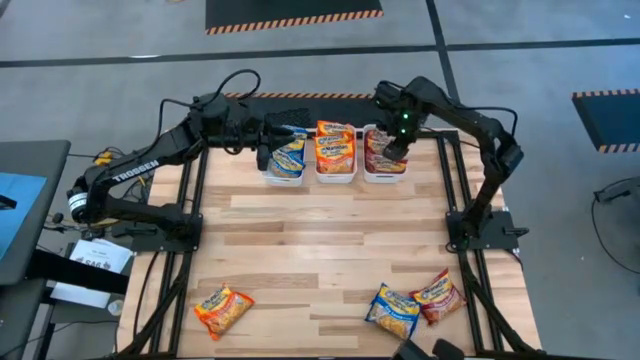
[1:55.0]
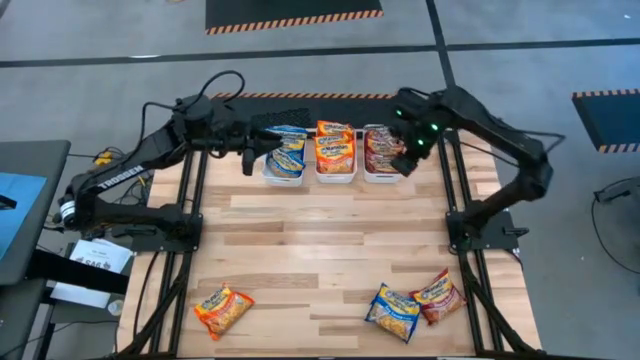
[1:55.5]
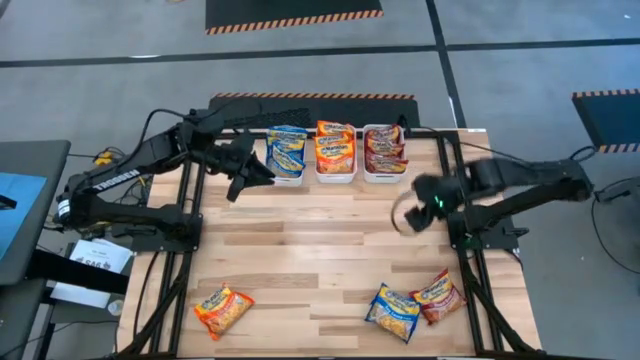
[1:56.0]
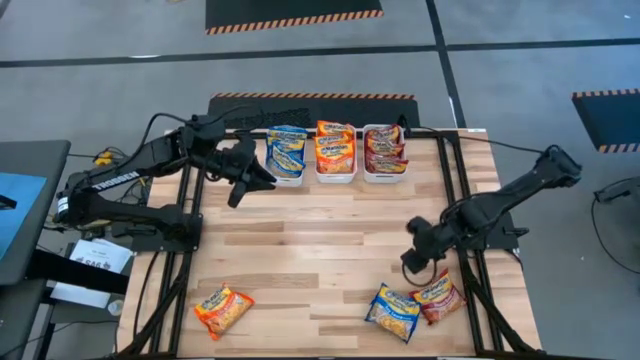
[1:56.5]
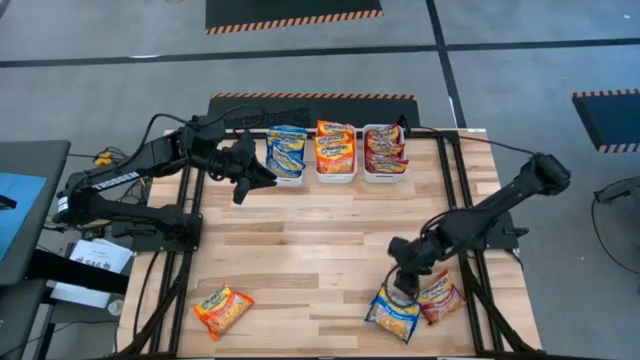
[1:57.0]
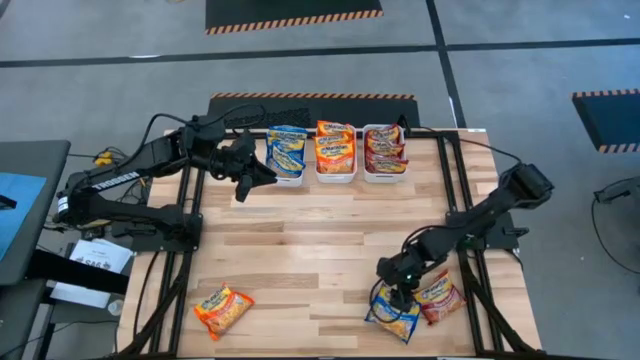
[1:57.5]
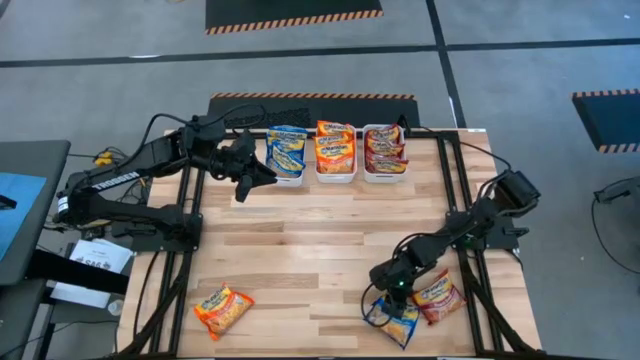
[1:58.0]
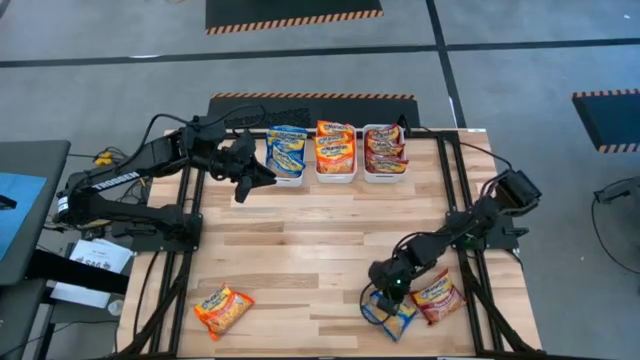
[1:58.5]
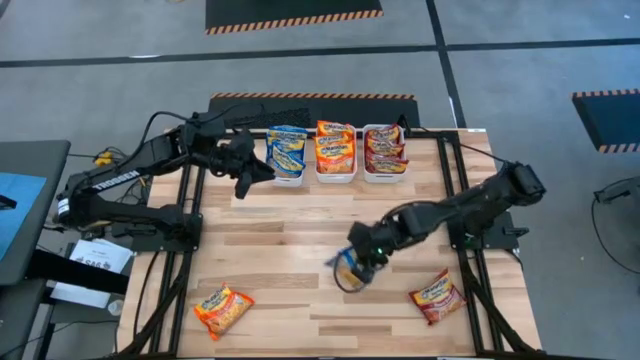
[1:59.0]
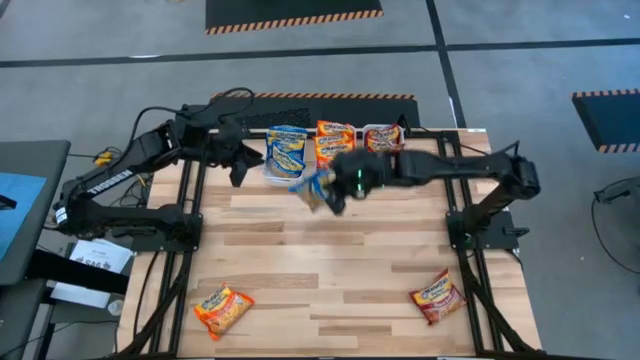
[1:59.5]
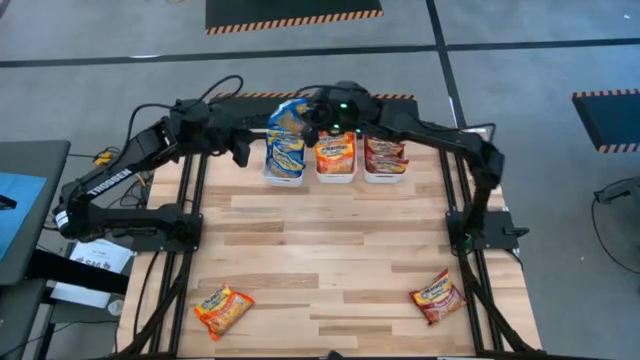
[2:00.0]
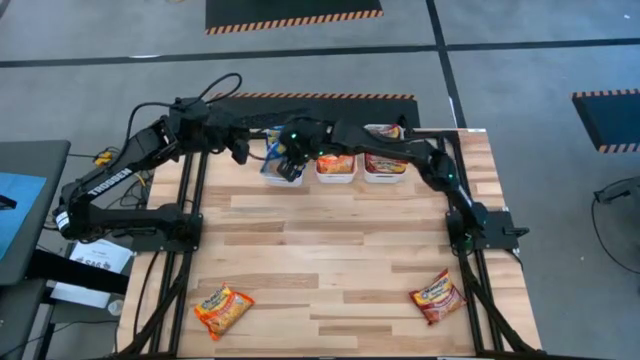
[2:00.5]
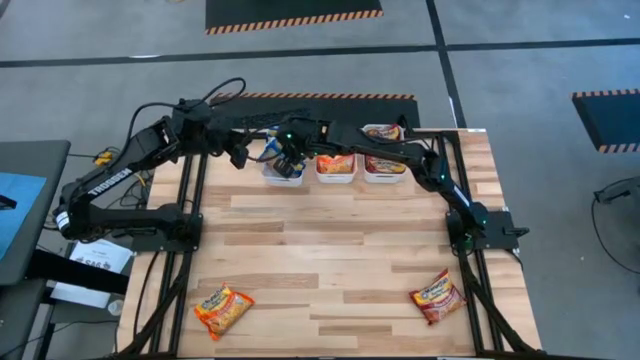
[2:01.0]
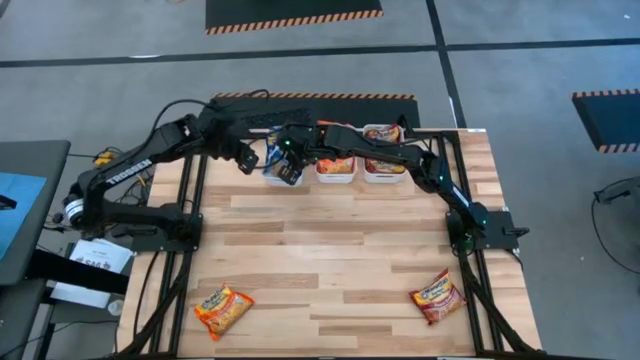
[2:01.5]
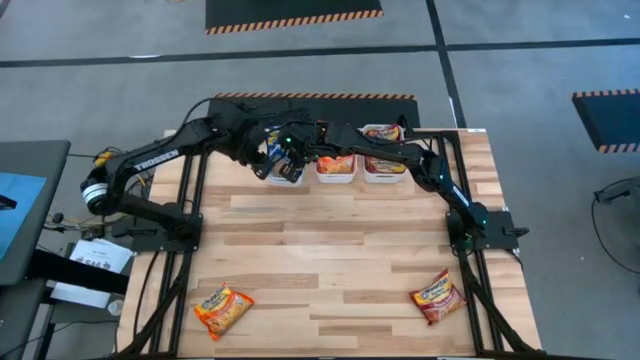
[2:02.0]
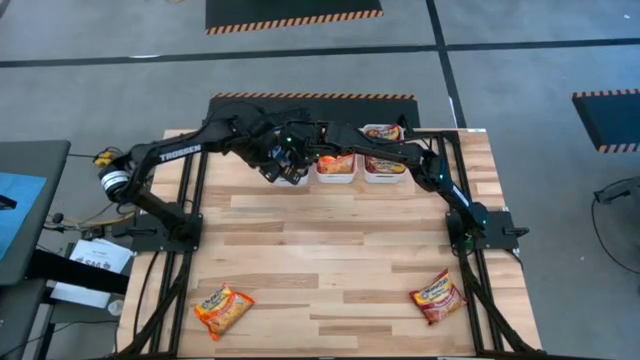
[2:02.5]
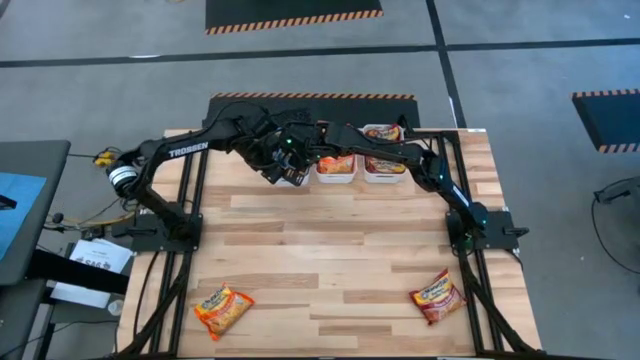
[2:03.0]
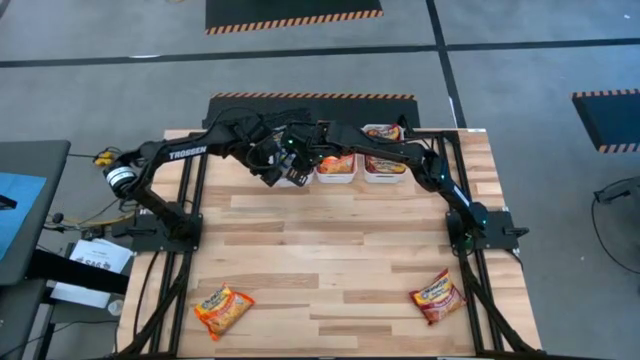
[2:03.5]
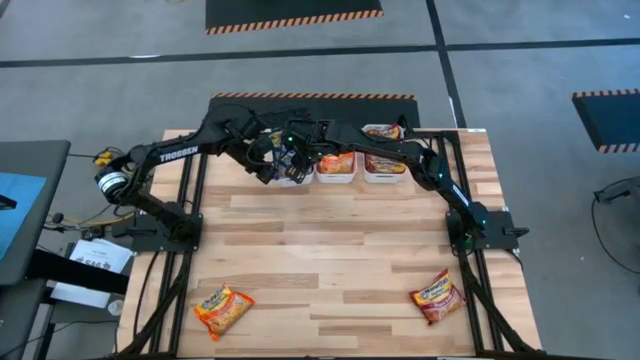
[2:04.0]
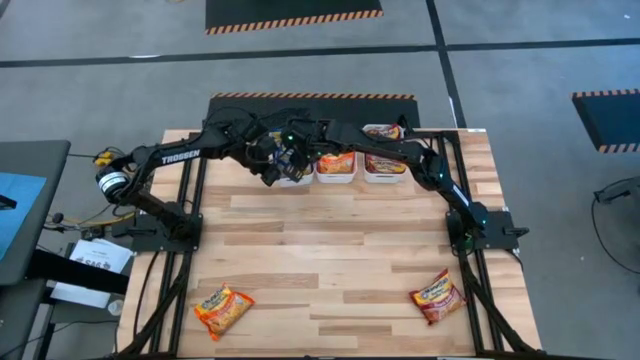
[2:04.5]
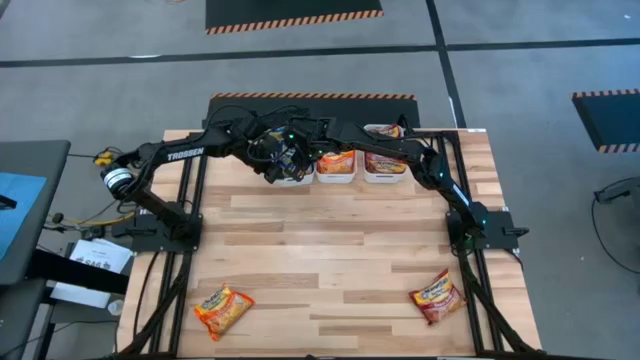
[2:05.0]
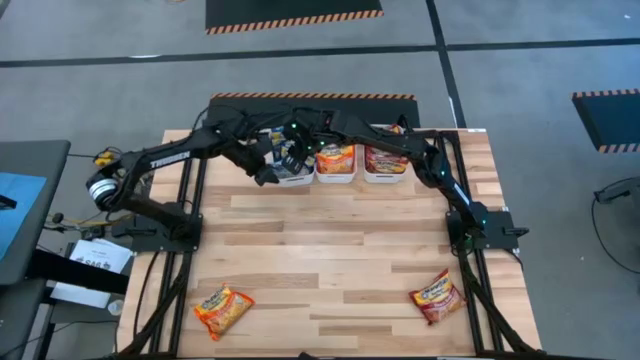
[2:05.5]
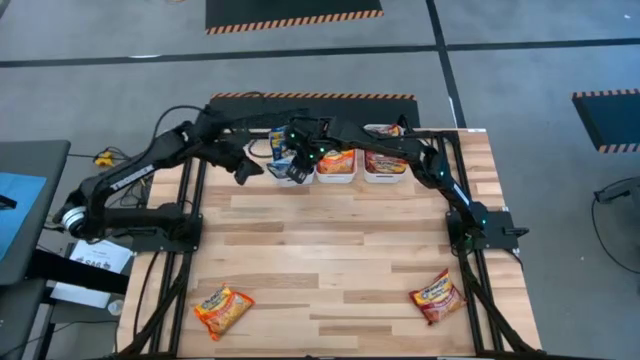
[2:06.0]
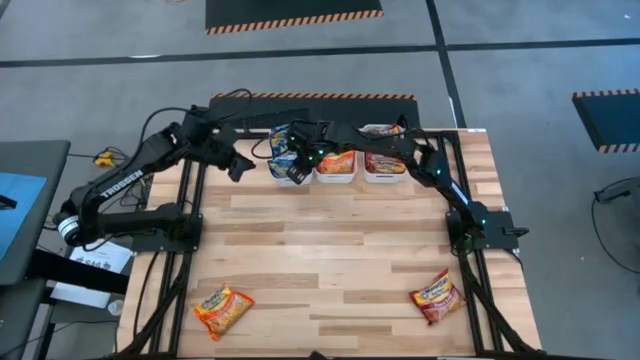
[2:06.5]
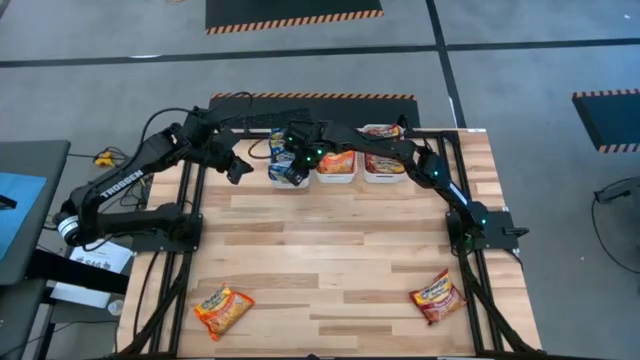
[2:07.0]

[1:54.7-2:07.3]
Task: Sort Maruchan noodles
Put the blue noodle pack into the left white bin

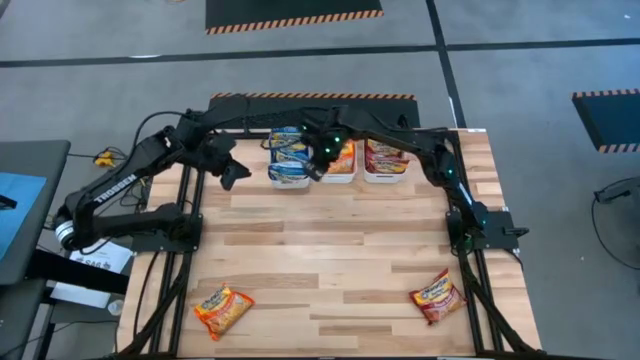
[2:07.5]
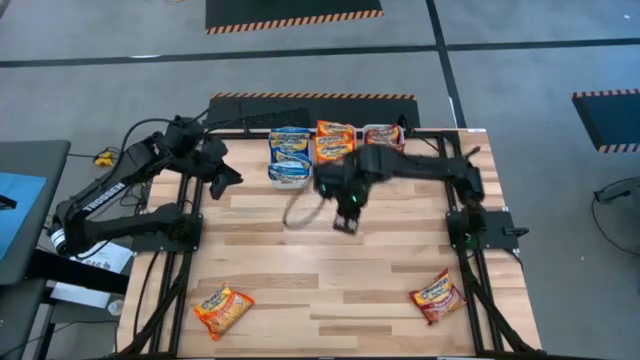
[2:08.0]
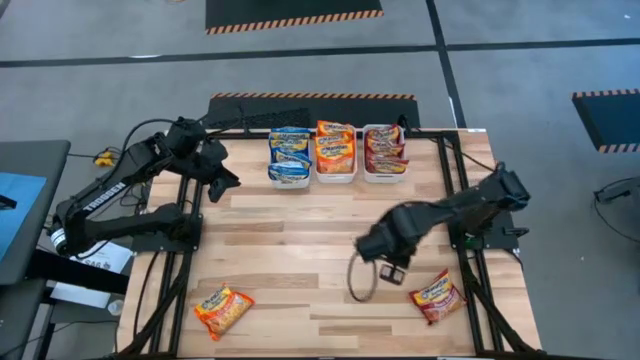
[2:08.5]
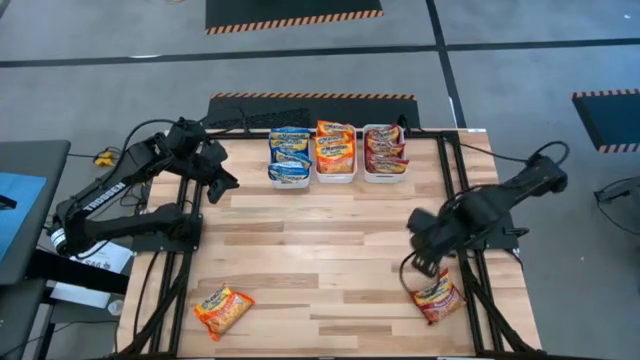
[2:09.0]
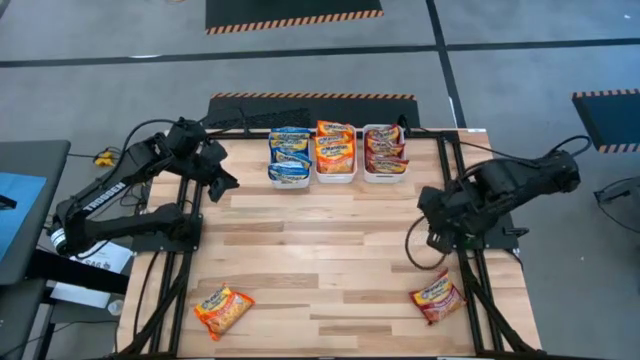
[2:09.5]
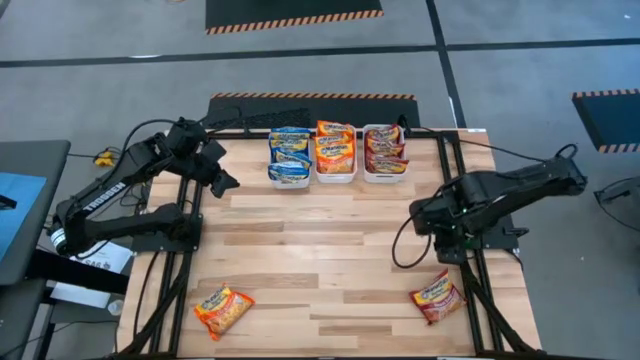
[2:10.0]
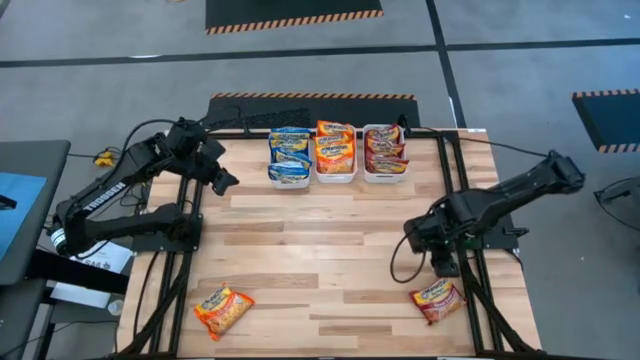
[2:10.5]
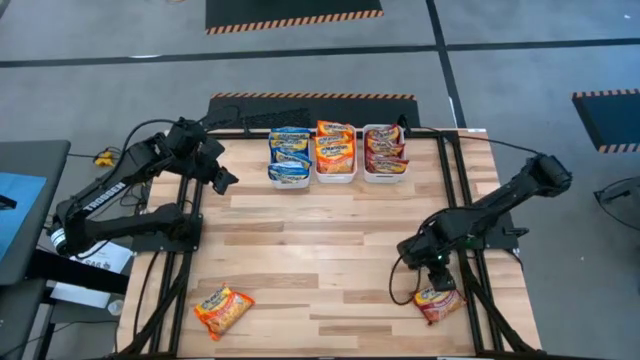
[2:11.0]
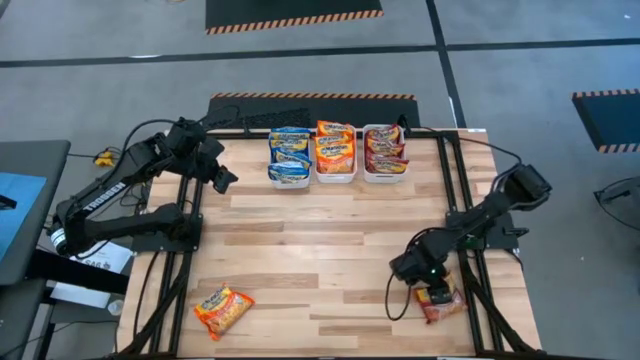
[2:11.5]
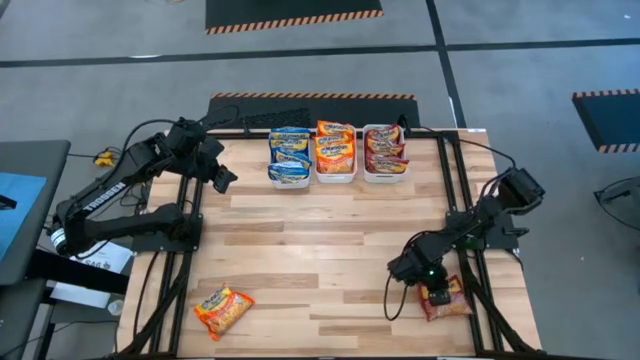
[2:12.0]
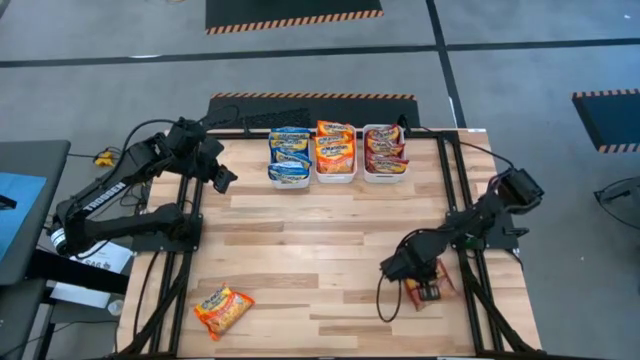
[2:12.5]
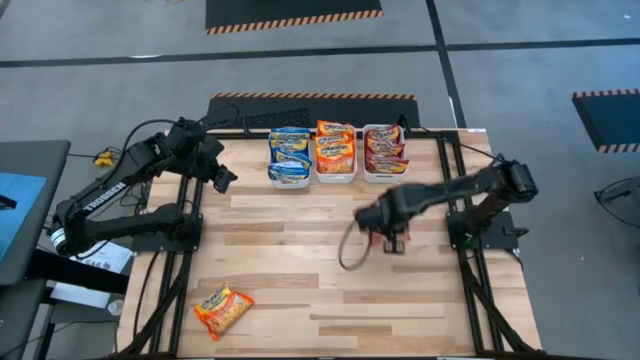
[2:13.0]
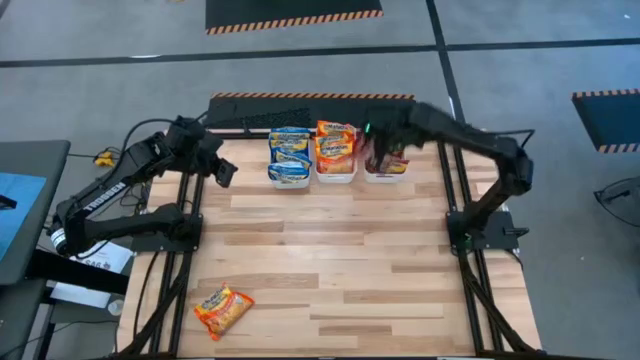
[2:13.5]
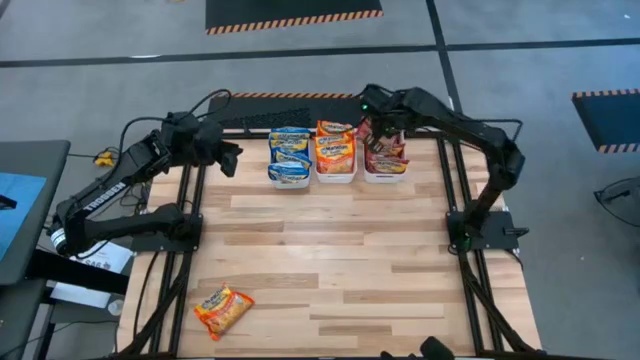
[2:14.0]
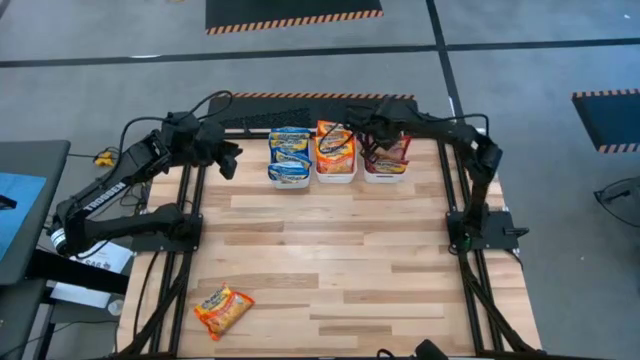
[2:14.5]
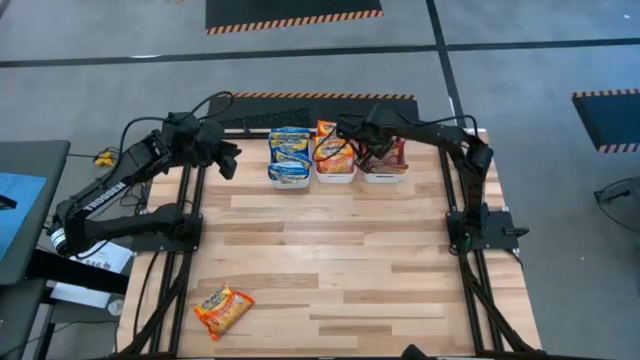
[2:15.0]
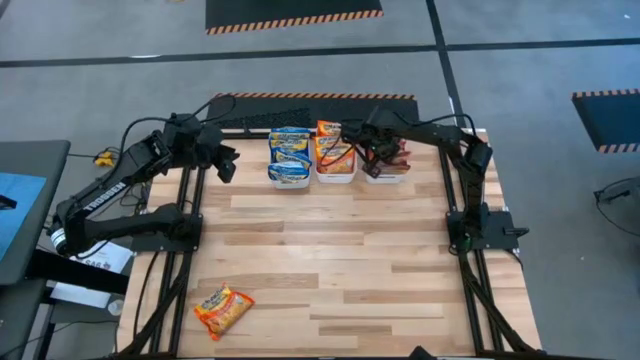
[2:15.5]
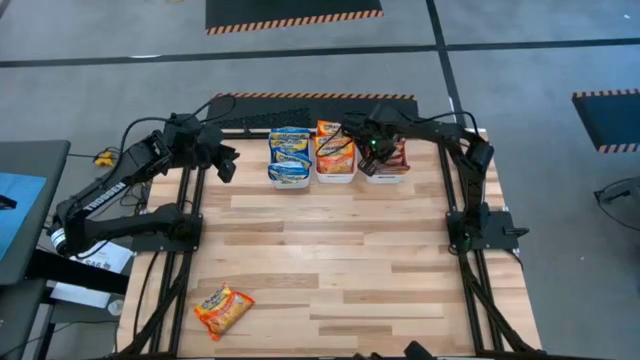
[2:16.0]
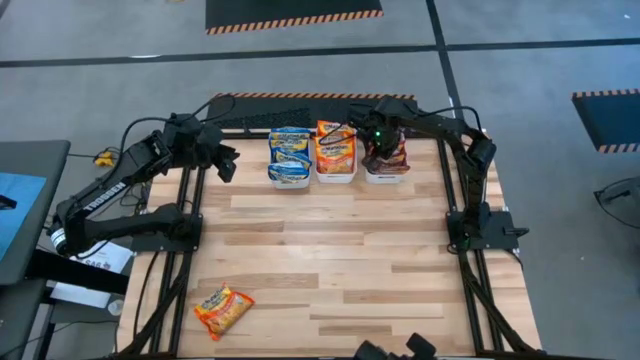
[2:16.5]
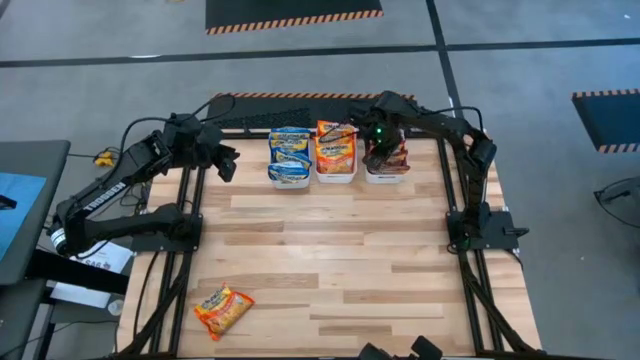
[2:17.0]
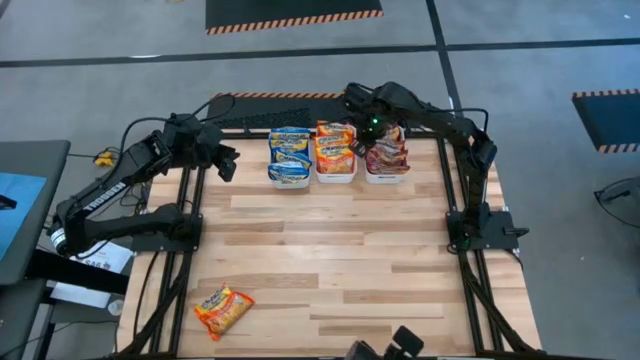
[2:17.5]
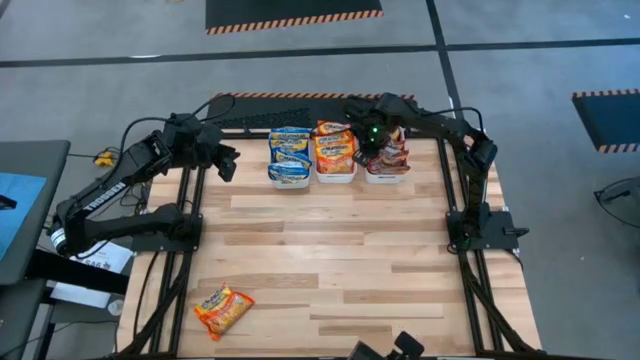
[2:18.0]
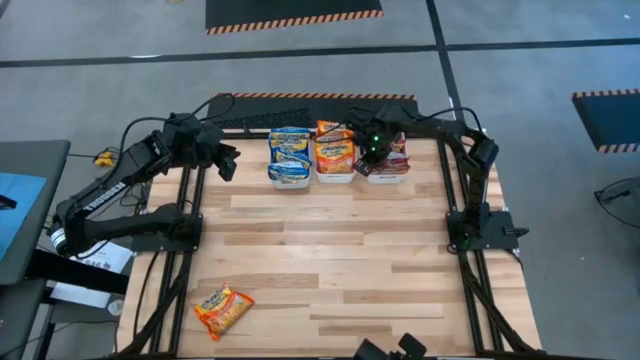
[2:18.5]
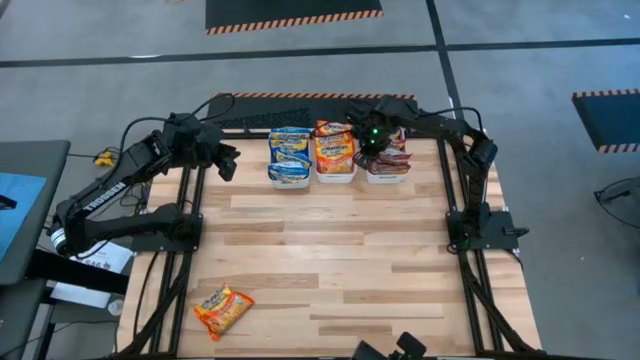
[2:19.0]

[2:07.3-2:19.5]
Put the red noodle pack into the right white bin
